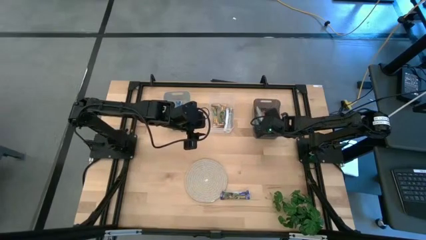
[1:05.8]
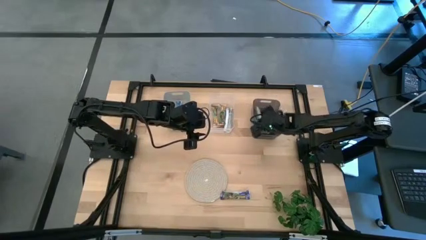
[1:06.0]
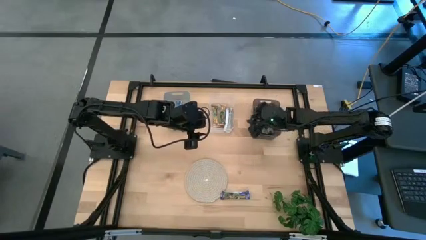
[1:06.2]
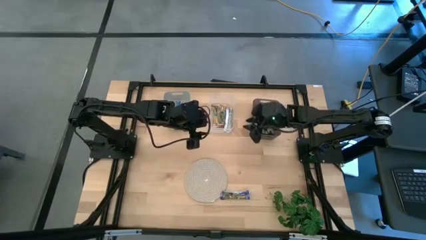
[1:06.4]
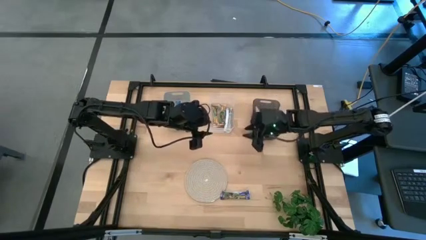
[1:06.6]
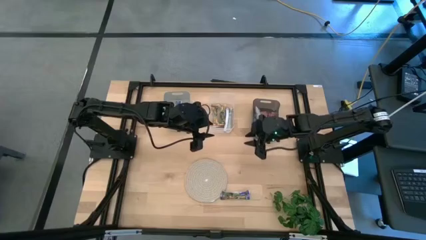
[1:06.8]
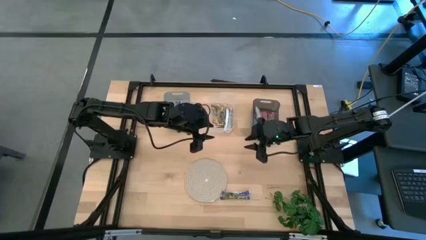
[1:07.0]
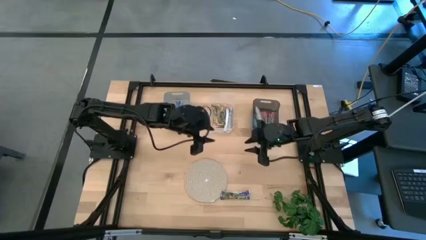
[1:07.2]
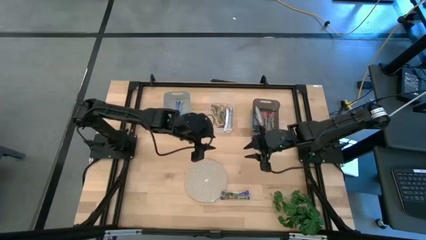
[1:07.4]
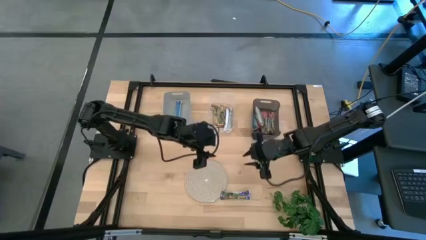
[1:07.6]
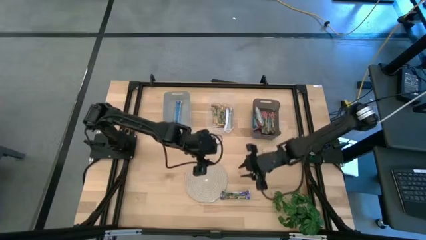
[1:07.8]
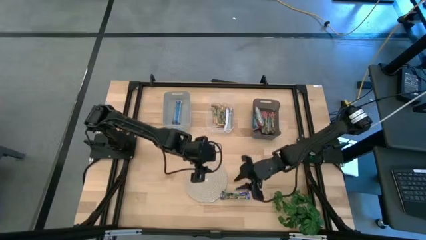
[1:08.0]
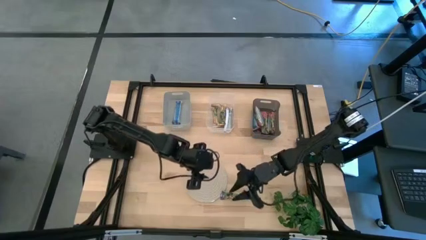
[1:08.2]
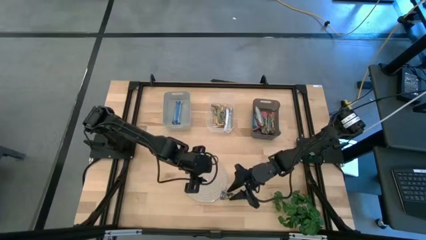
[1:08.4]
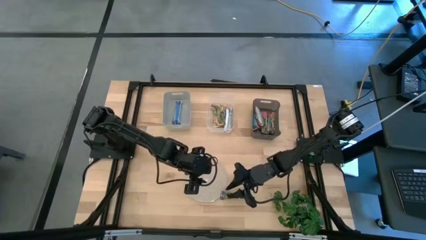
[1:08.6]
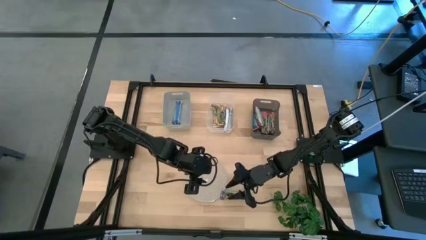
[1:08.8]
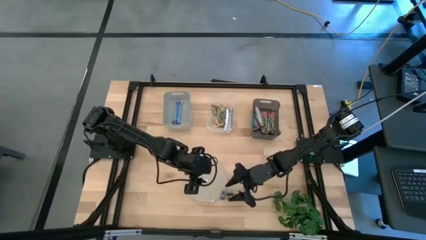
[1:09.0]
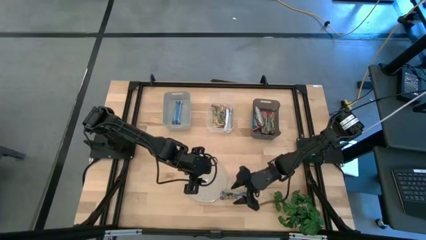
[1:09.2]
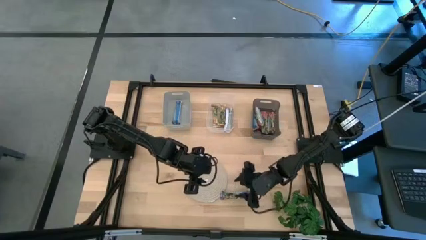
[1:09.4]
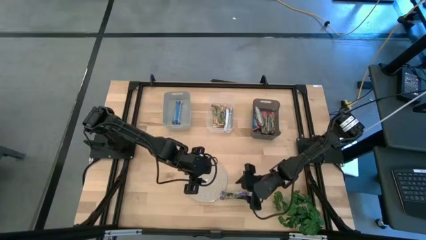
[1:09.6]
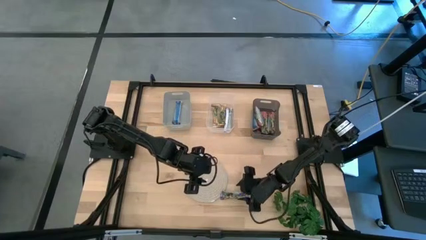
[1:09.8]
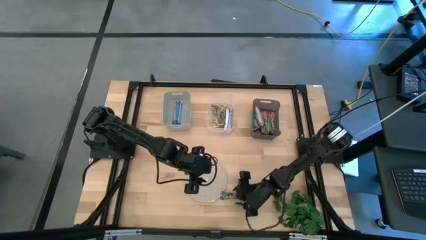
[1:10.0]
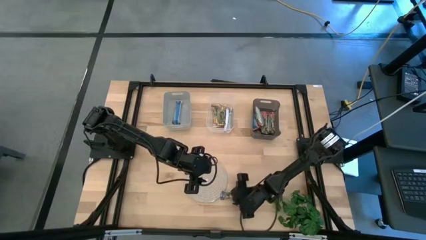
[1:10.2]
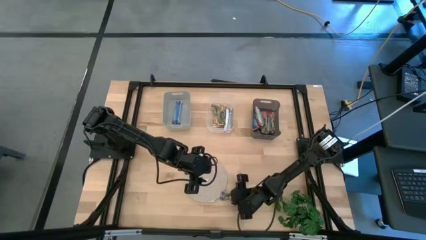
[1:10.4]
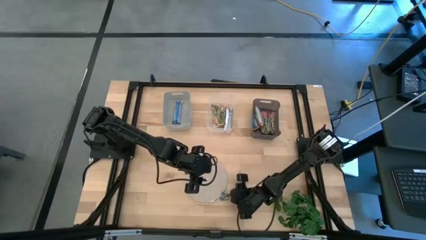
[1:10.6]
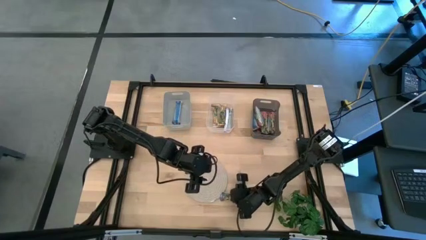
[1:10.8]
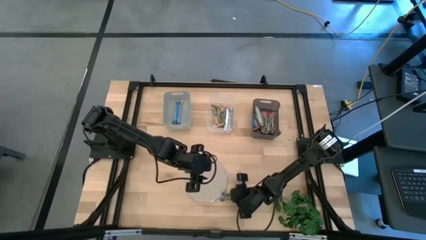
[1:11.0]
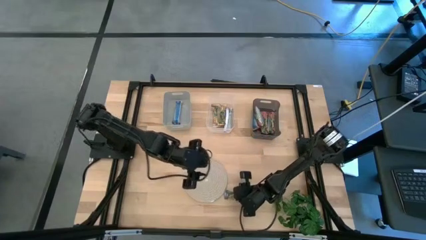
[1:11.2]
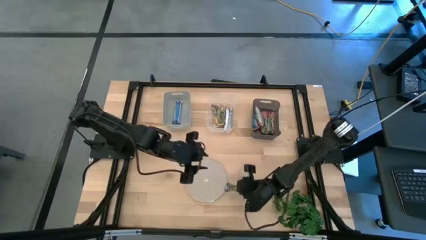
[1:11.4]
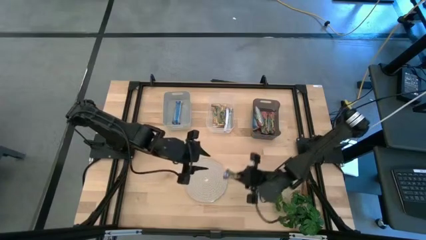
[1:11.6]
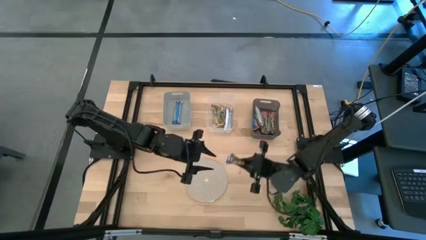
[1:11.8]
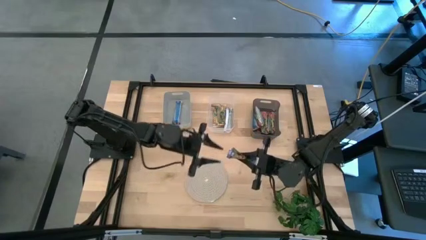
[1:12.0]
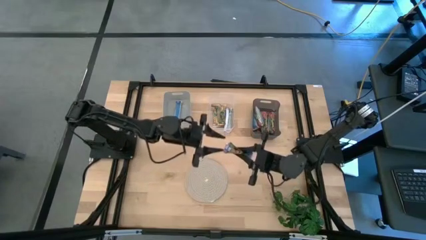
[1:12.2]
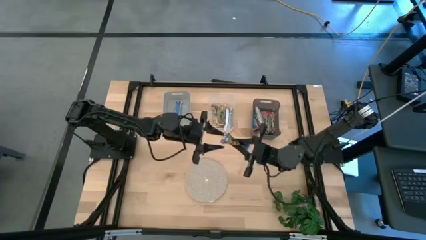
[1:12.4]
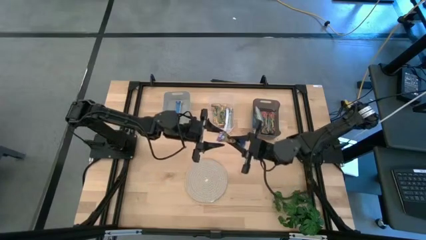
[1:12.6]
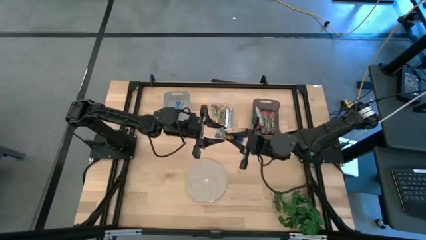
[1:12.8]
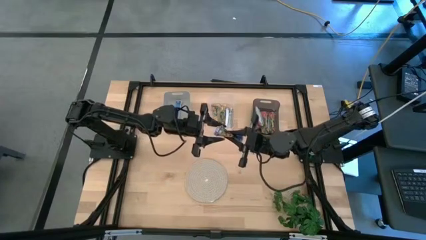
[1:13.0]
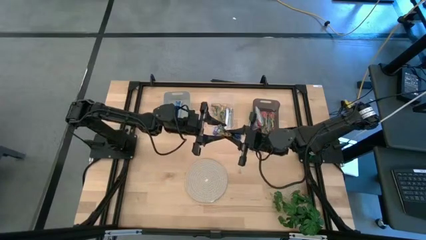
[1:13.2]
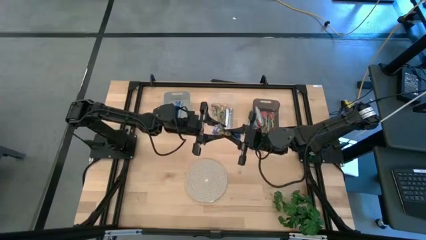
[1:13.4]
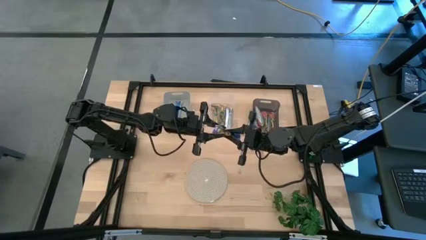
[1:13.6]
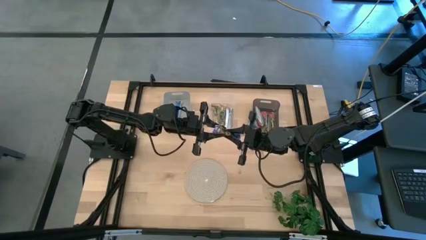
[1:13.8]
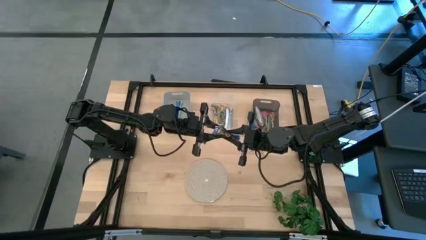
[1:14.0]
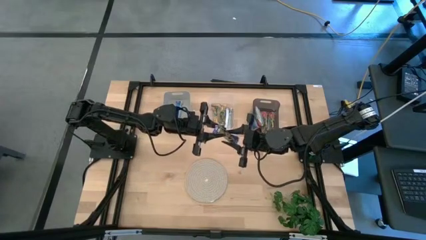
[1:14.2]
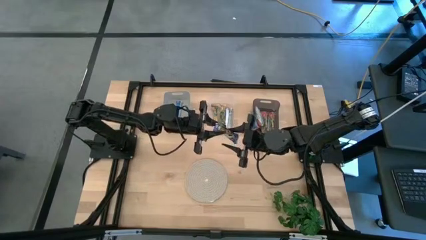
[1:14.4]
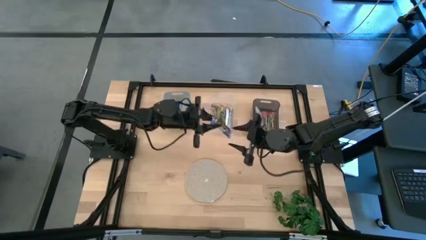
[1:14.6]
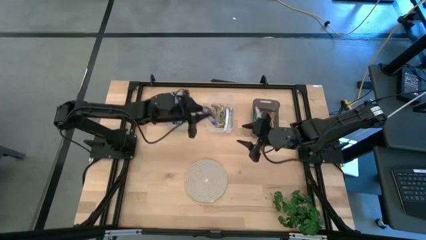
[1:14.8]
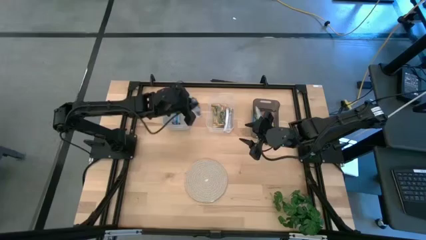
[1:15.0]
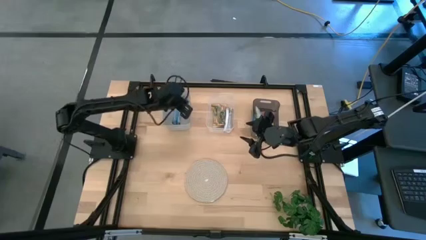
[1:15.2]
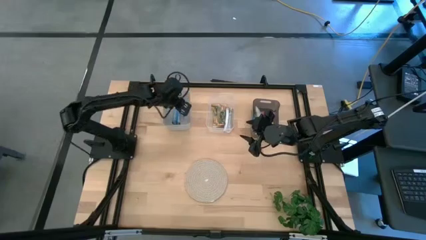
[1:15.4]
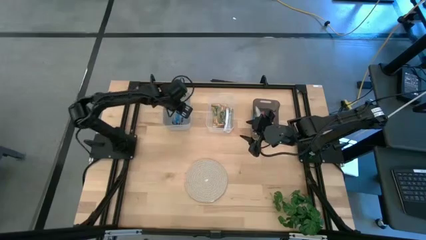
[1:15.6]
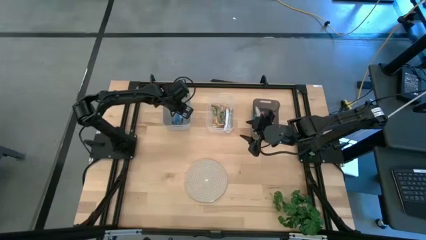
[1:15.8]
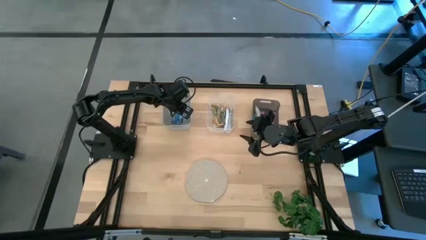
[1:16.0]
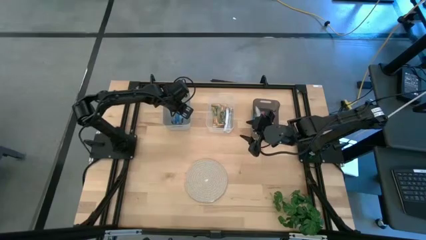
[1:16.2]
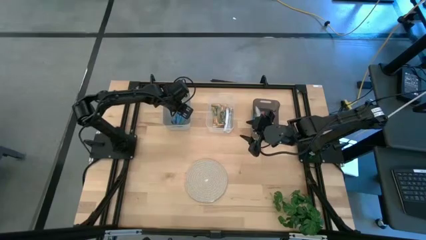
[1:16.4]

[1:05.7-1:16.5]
Task: Pick and place Granola Bars by type
Put the blue granola bar into the gray bin

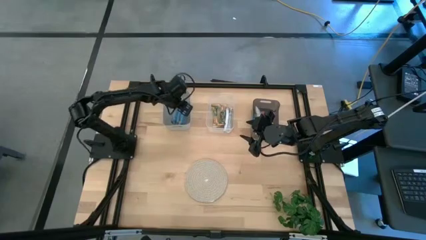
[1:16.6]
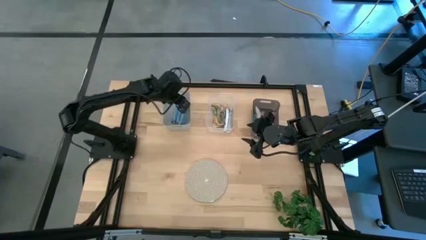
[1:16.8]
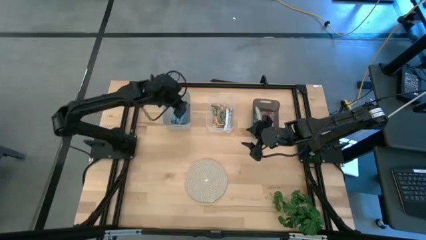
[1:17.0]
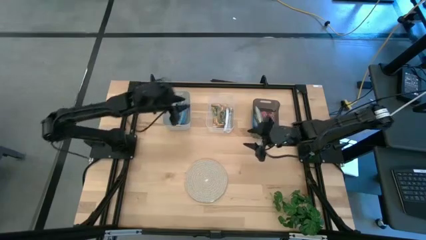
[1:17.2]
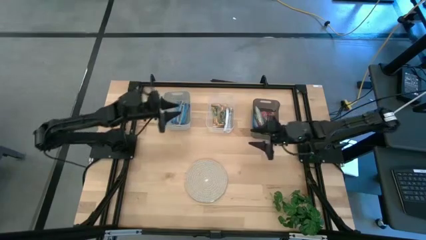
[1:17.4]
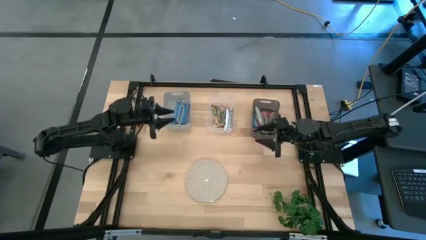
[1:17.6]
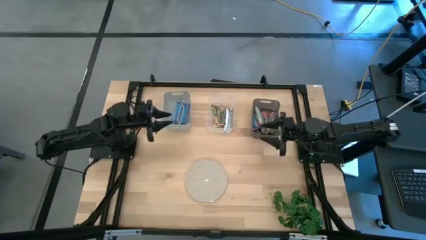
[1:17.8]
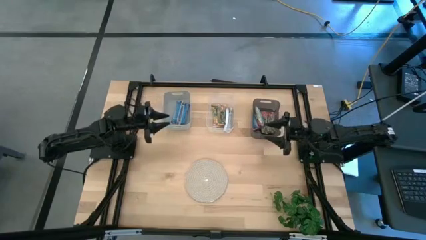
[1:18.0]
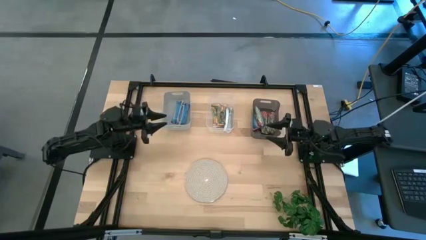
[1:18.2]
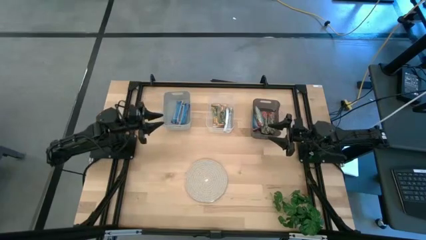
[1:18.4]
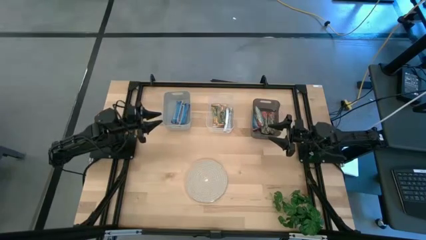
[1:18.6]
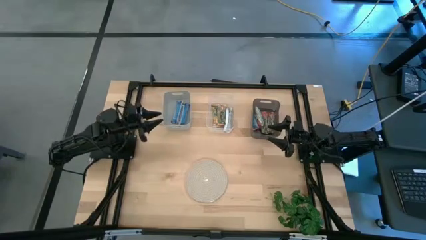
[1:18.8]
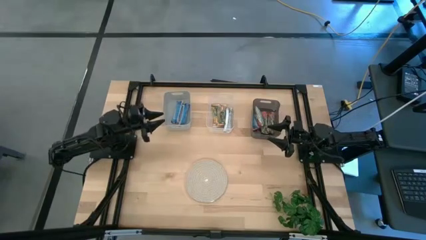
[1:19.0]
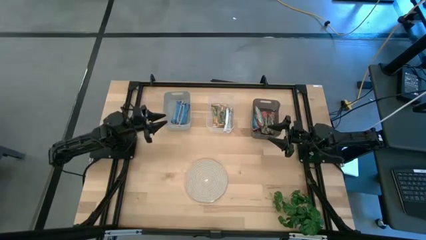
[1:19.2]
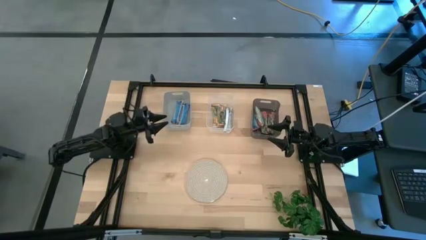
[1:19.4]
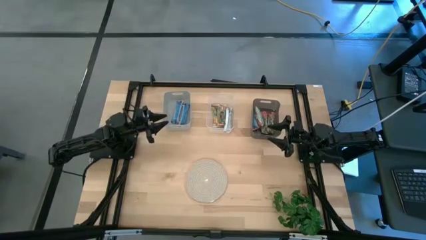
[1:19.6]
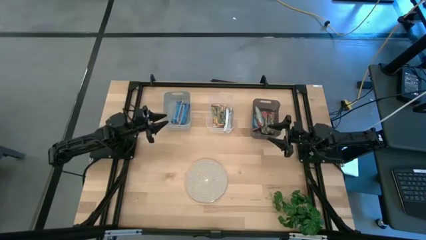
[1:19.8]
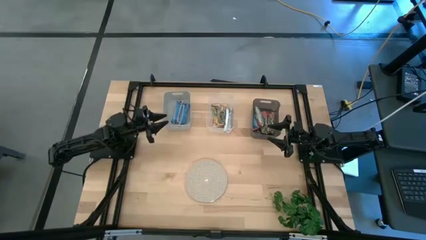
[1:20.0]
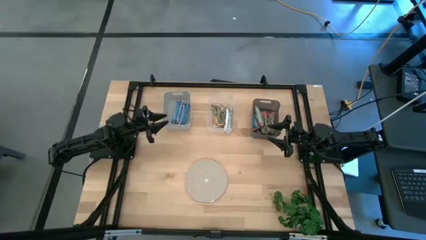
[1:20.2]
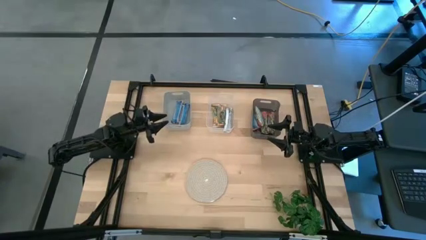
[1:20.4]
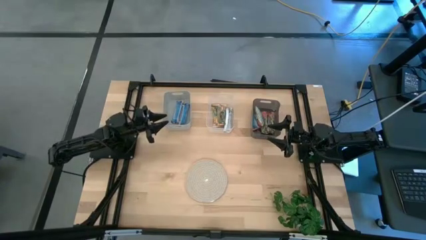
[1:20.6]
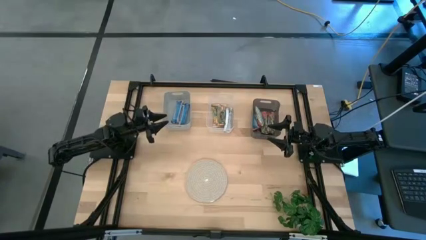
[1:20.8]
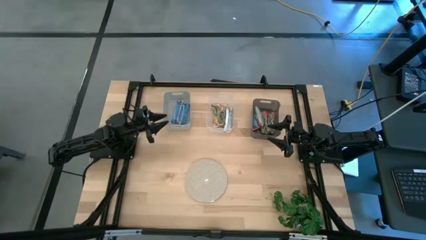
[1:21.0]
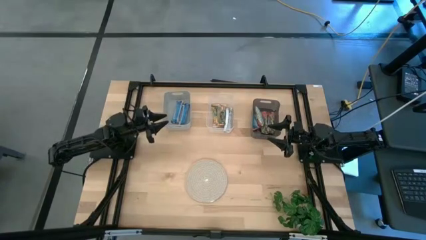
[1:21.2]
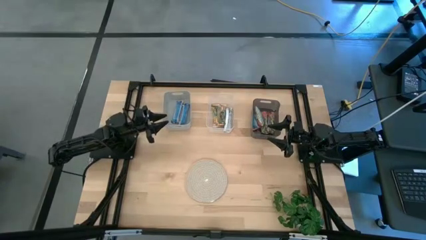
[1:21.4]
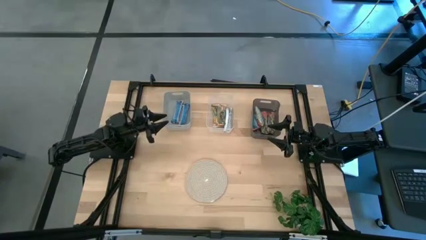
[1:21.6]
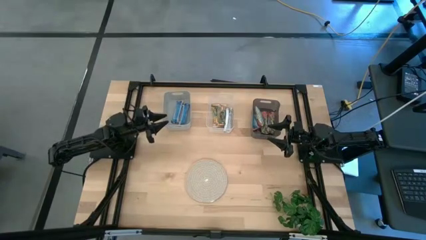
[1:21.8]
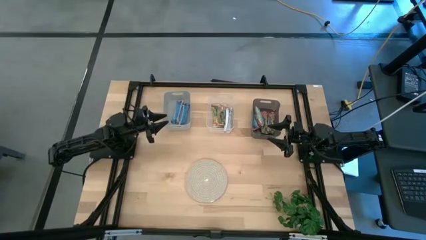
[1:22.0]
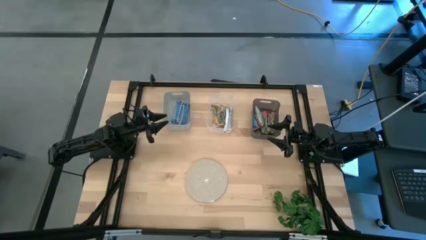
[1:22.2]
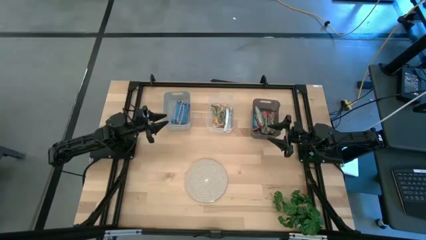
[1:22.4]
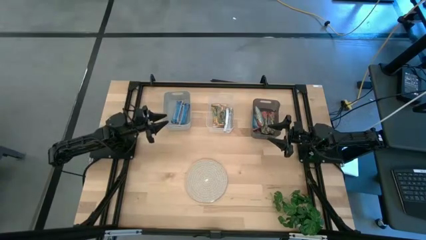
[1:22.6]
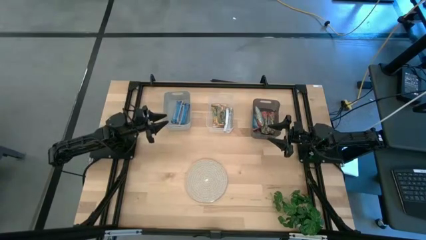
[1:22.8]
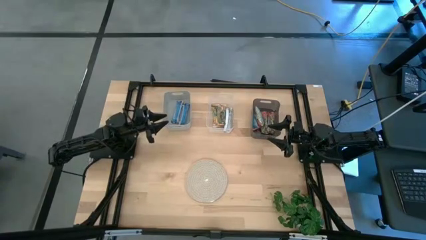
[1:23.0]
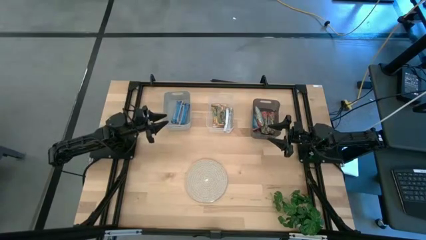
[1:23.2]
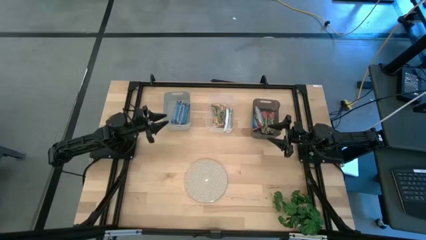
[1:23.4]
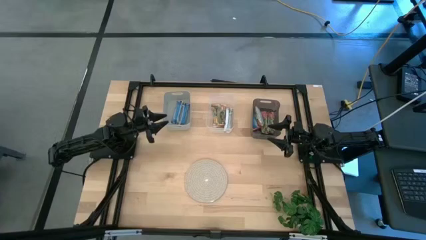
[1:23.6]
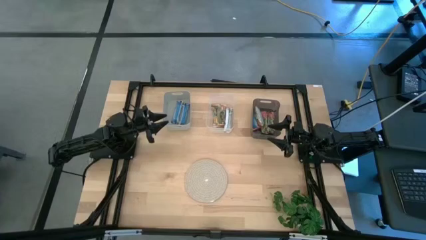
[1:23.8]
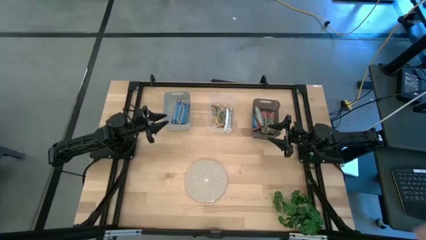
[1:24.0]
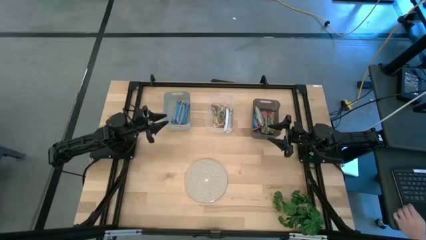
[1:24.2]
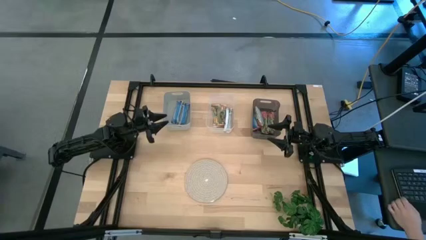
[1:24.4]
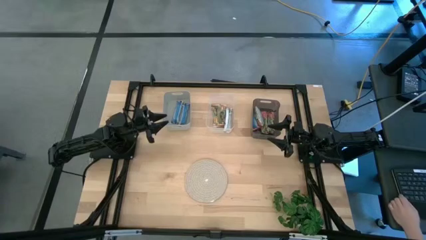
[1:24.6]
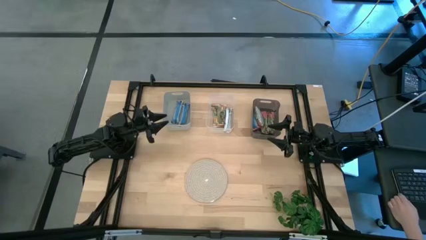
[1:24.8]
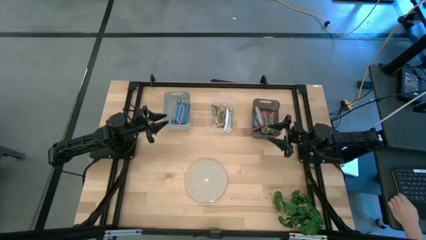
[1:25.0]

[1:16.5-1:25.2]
Return to Home Position
